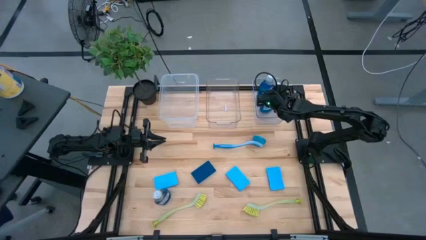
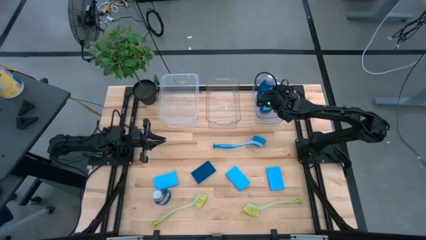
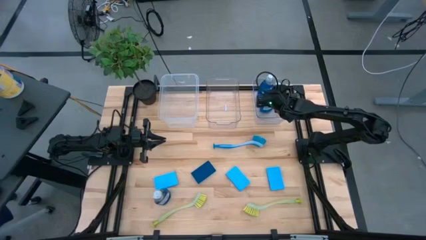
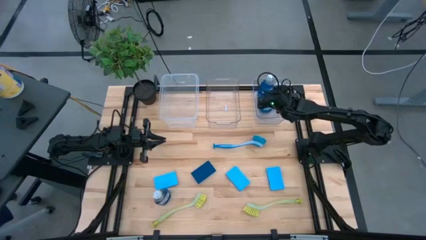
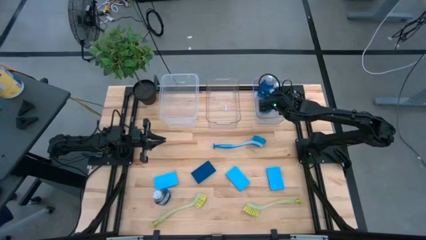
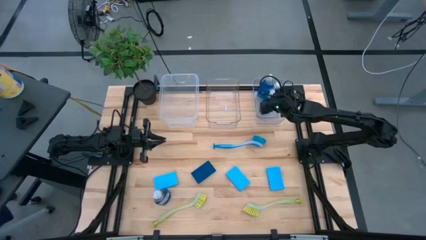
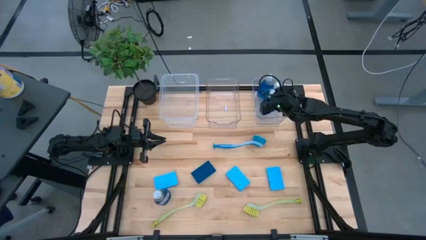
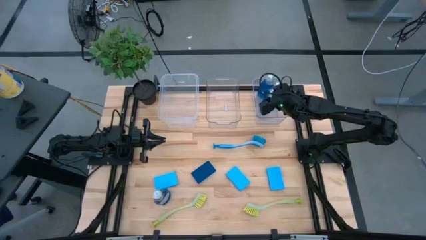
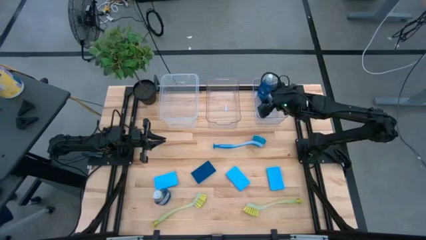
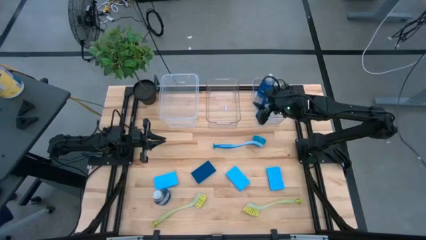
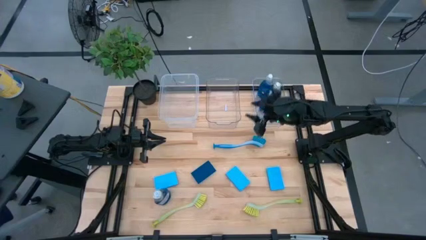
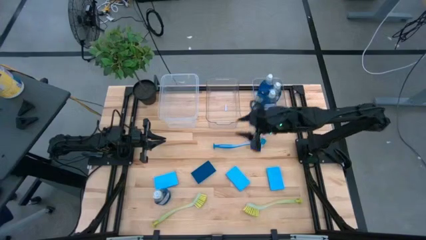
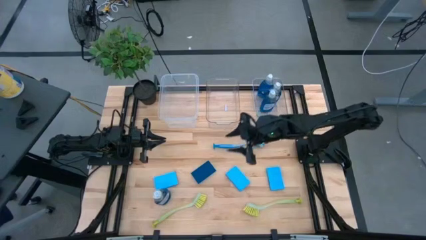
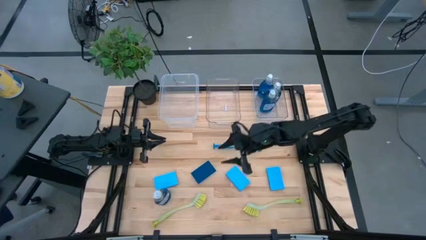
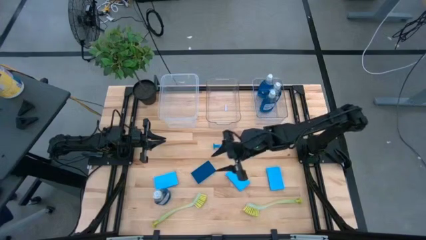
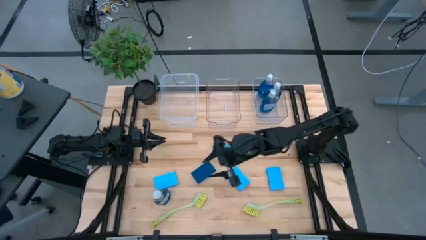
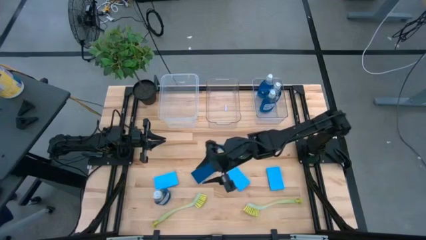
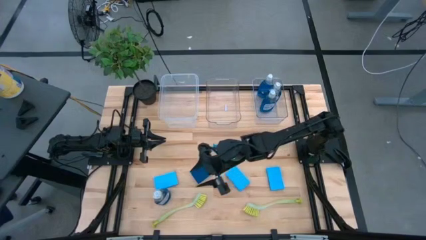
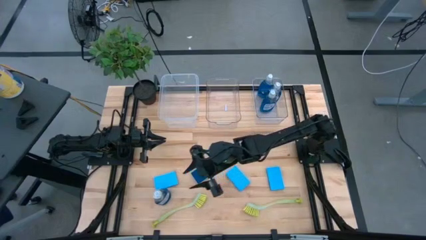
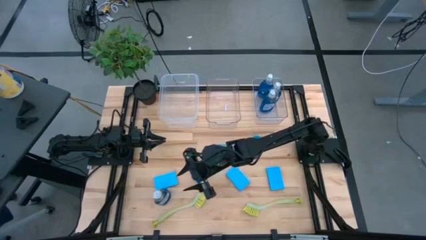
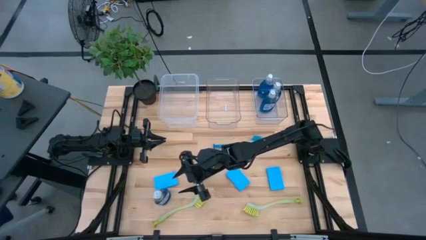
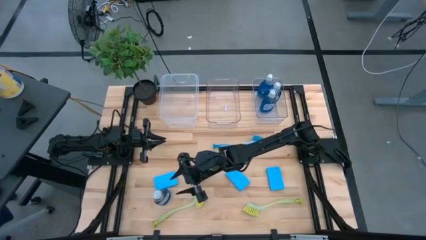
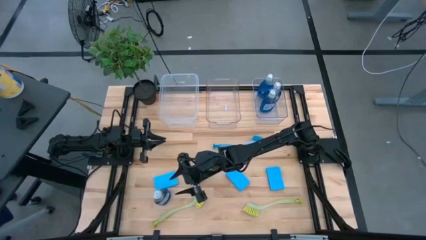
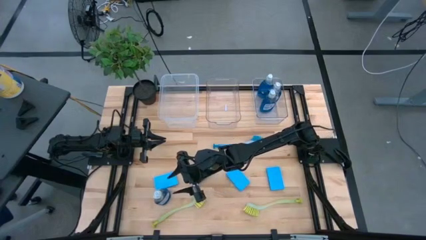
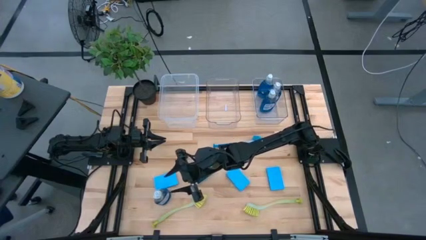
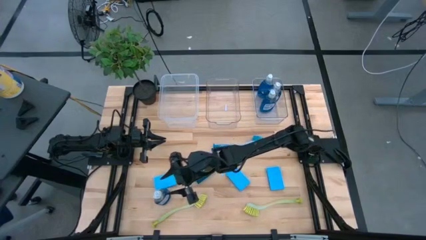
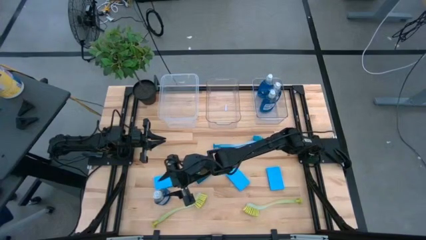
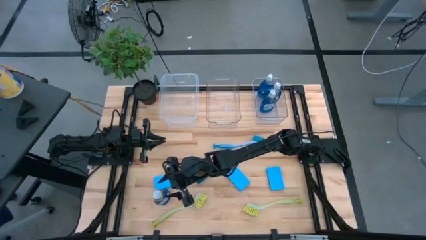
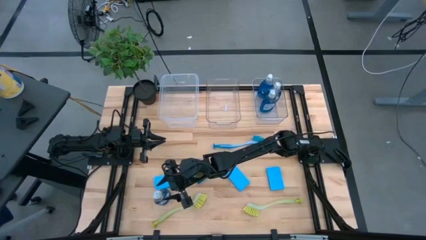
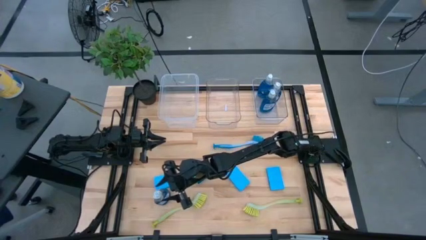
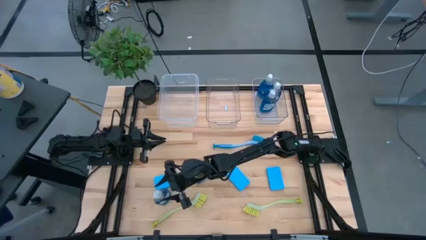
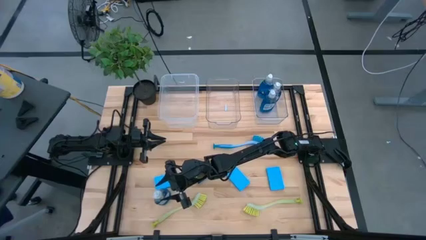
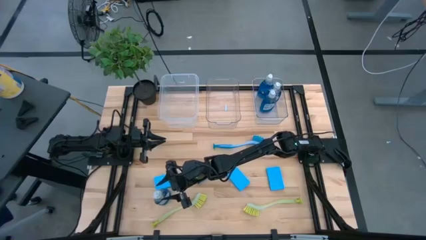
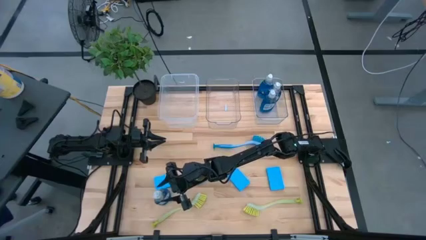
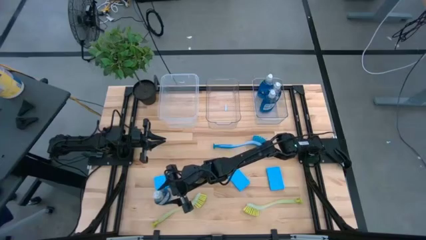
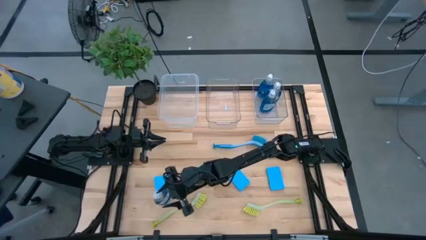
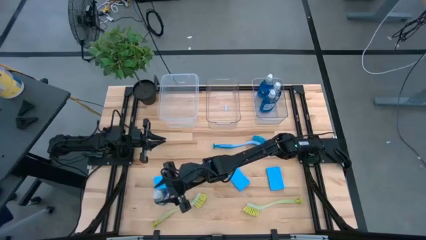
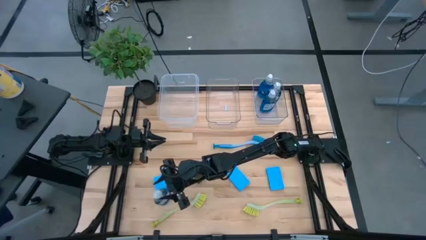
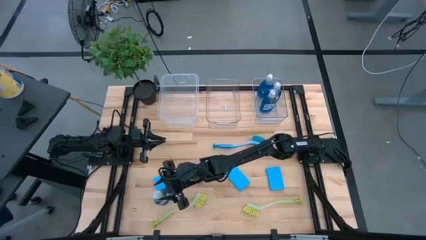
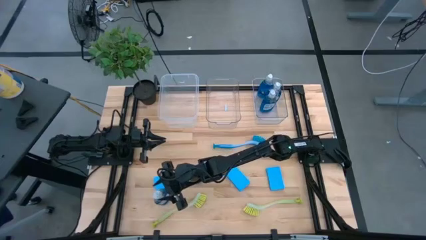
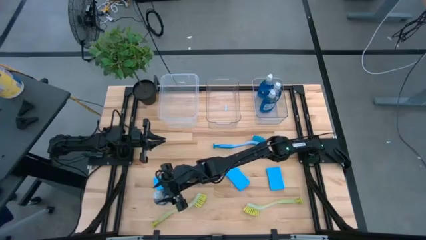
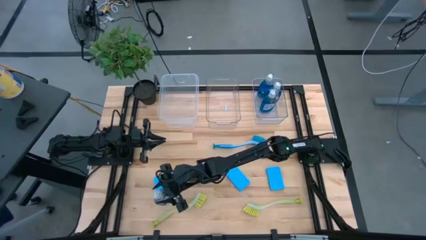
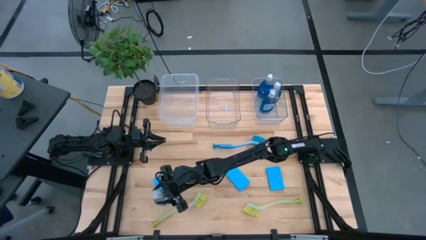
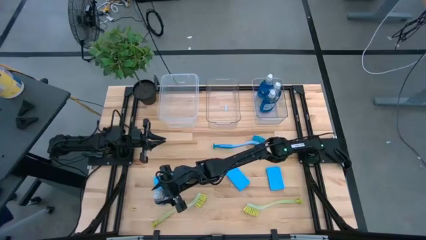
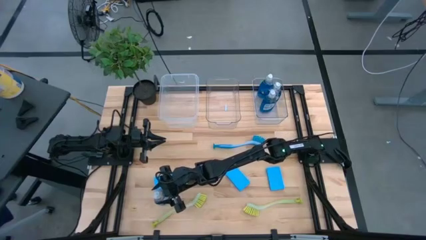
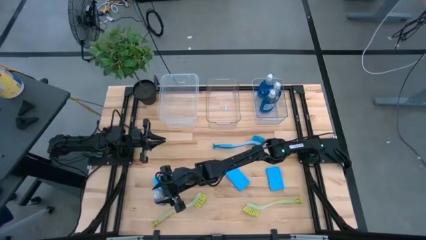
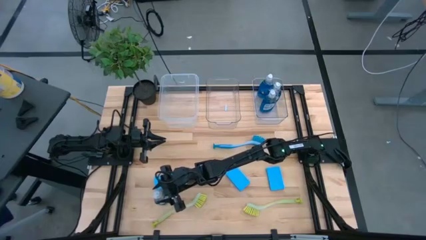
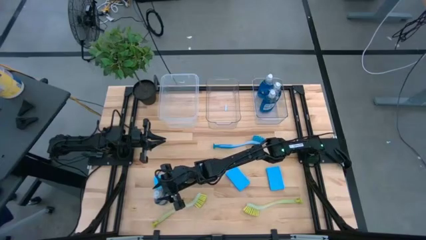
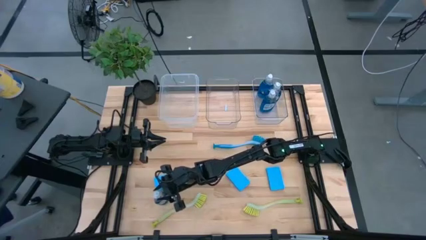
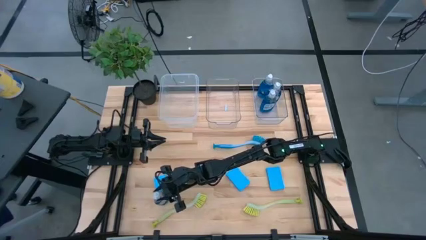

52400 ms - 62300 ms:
Task: Pick & Place Kitchen Sink Supplies
Put the blue detergent into the right transparent bin

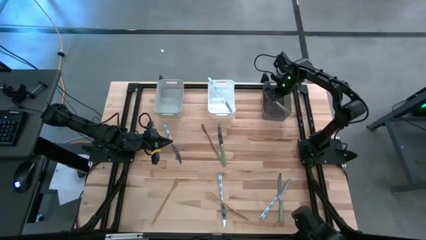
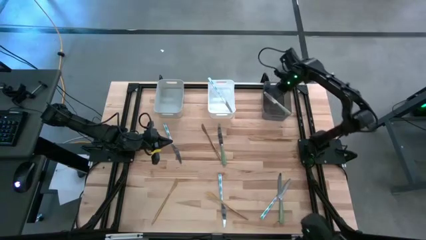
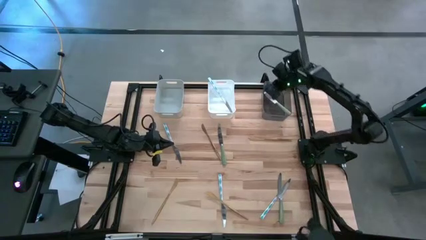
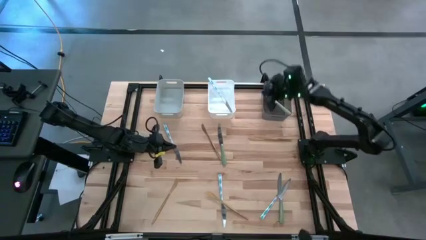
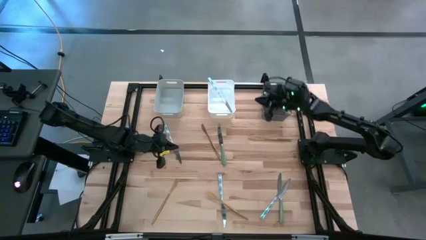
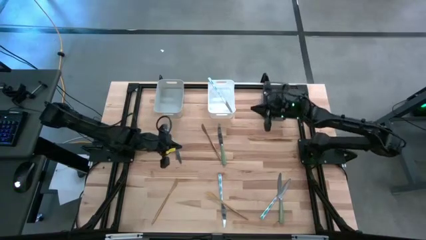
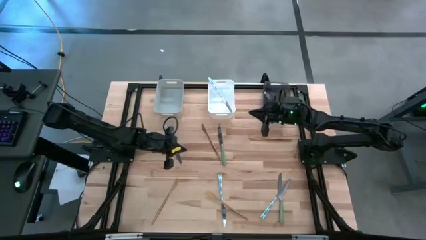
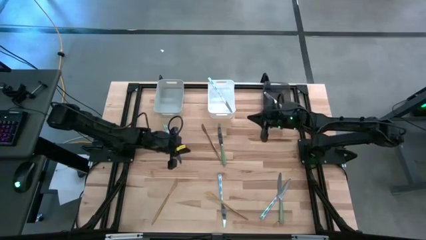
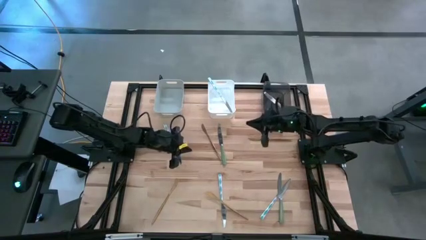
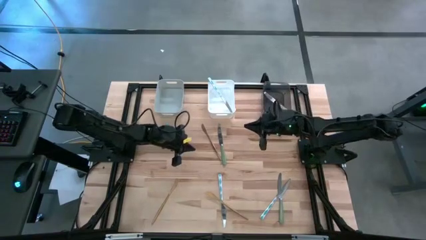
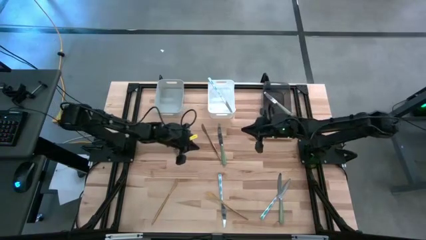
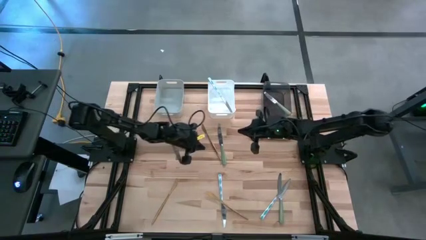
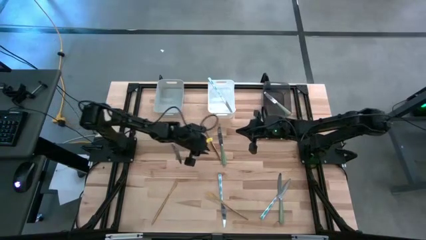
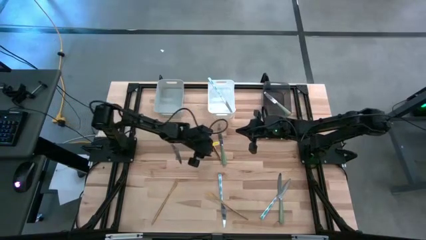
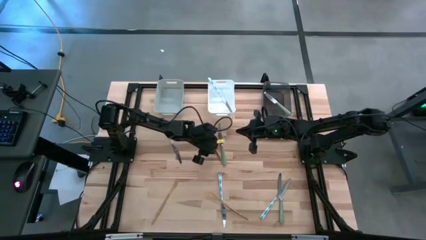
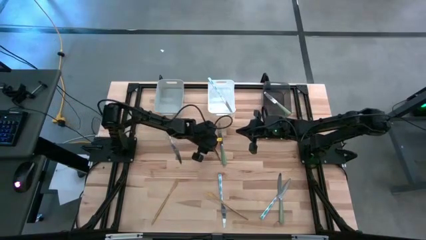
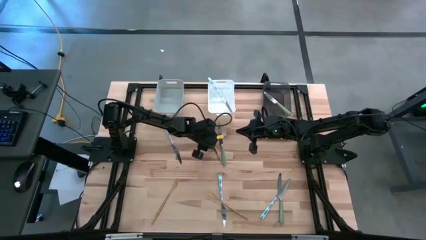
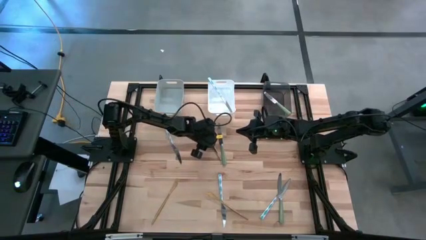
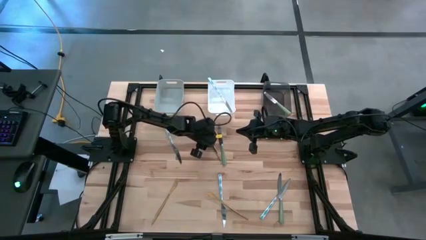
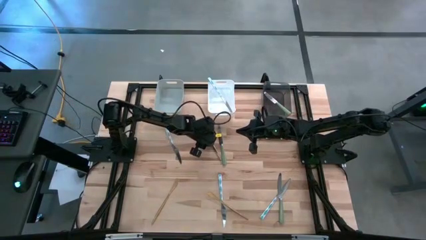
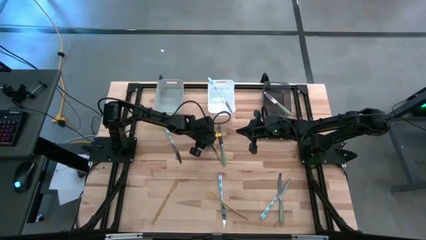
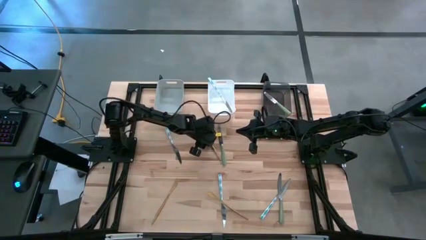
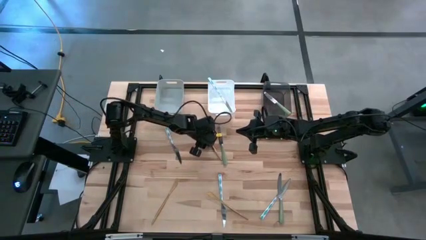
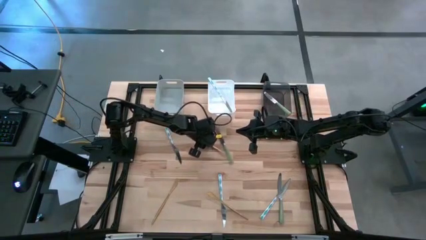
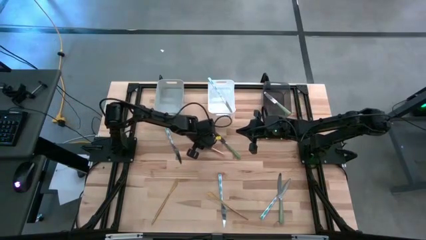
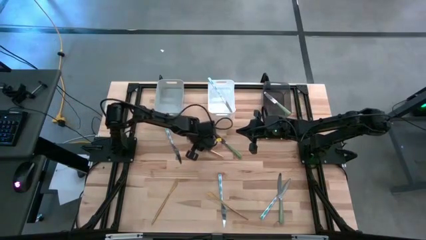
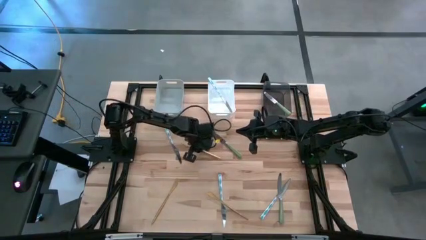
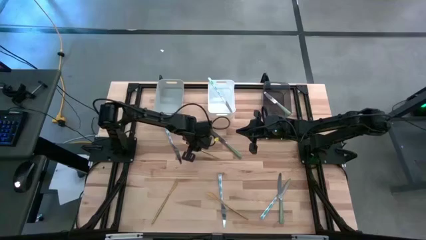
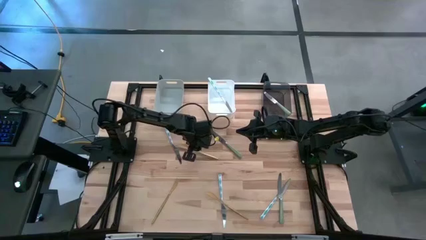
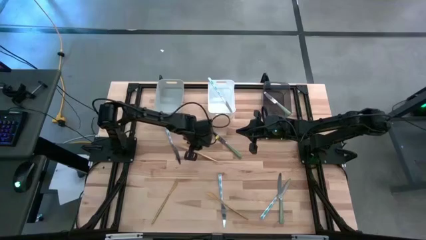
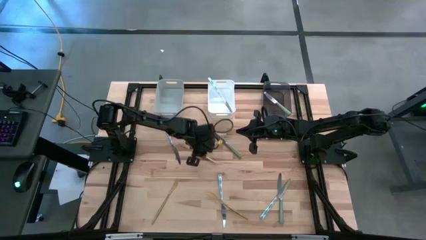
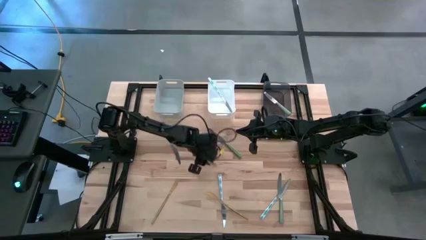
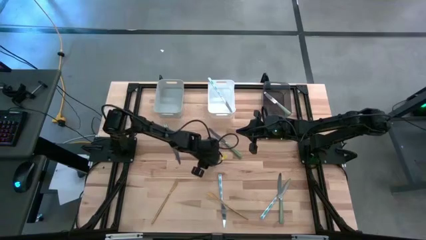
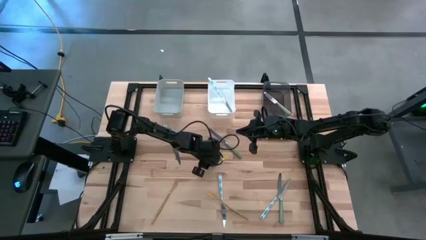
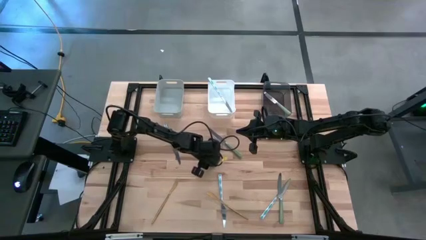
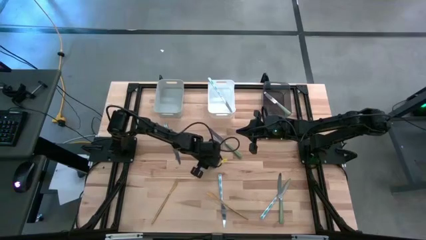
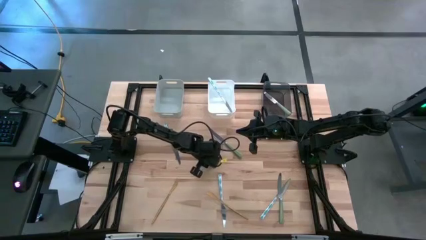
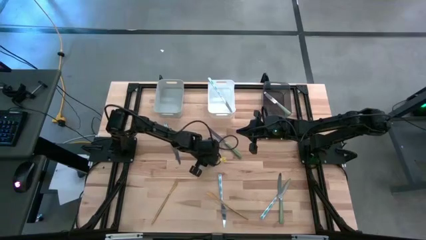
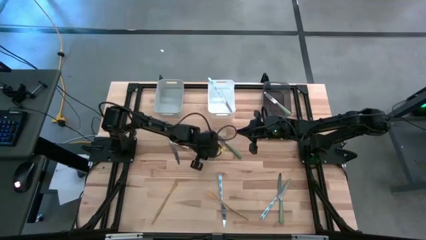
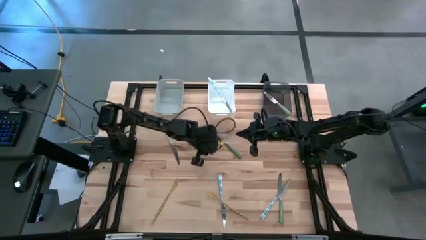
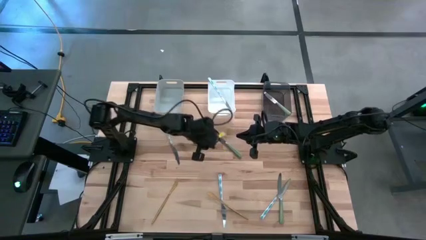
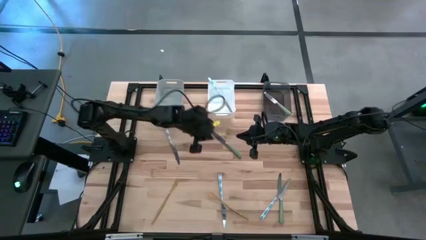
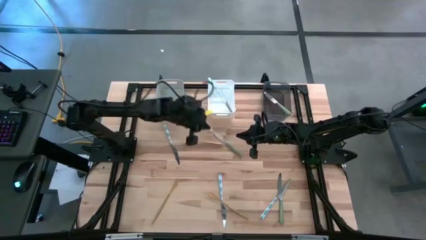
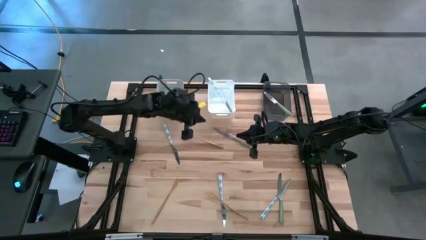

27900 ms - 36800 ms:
Task: Sort silverware by color (type)
Put the top left gold table knife into the gray bin
